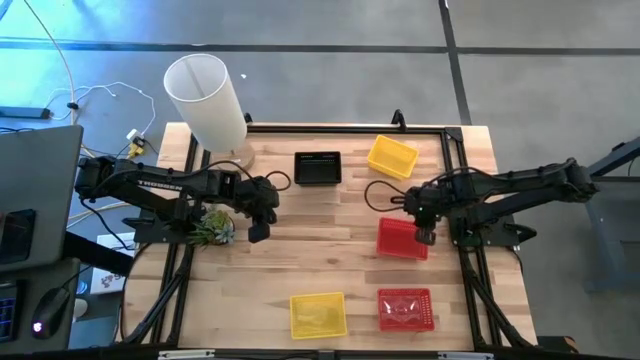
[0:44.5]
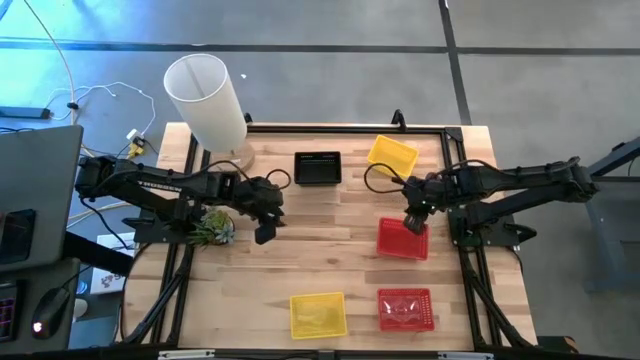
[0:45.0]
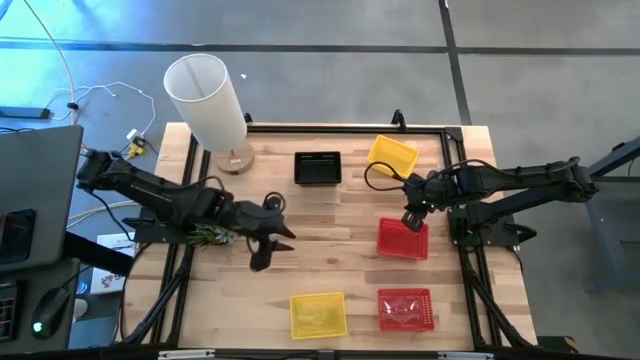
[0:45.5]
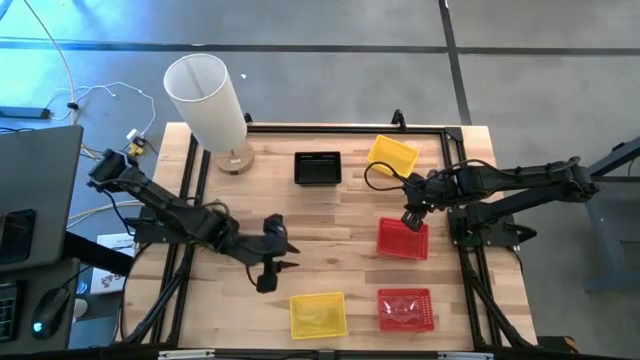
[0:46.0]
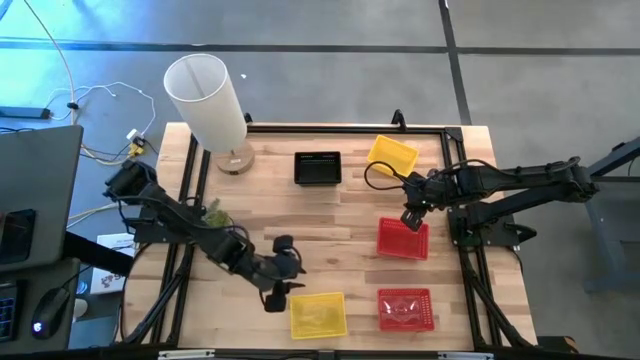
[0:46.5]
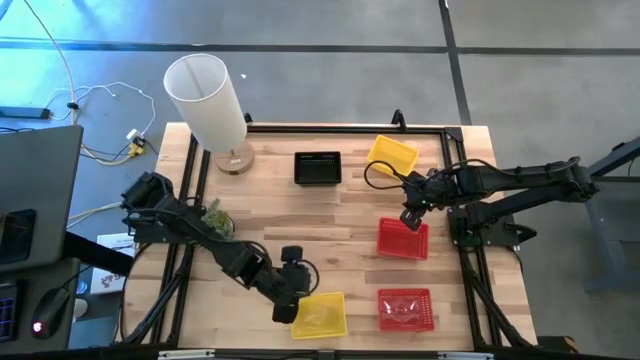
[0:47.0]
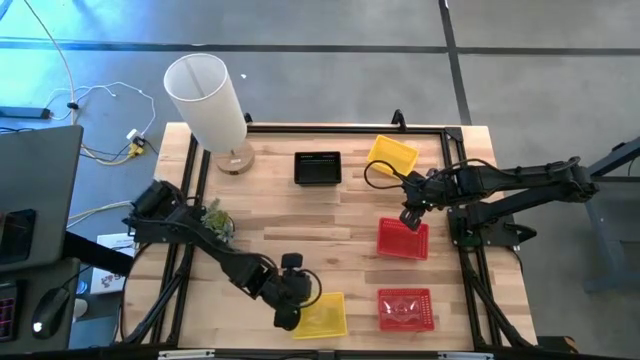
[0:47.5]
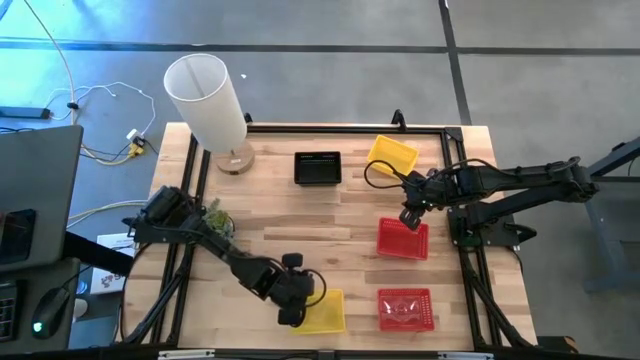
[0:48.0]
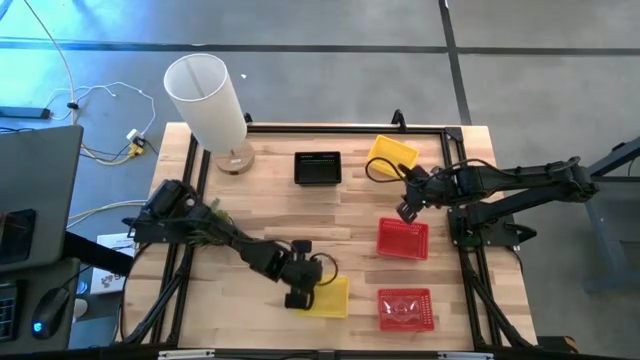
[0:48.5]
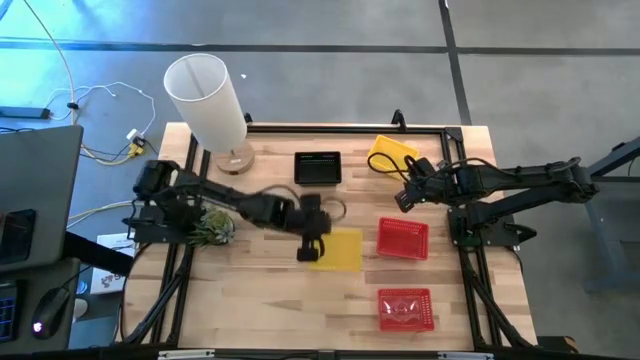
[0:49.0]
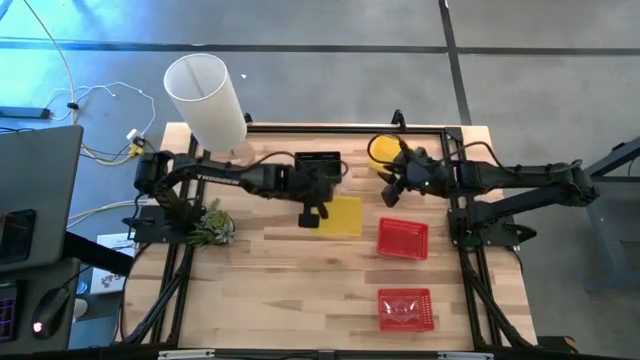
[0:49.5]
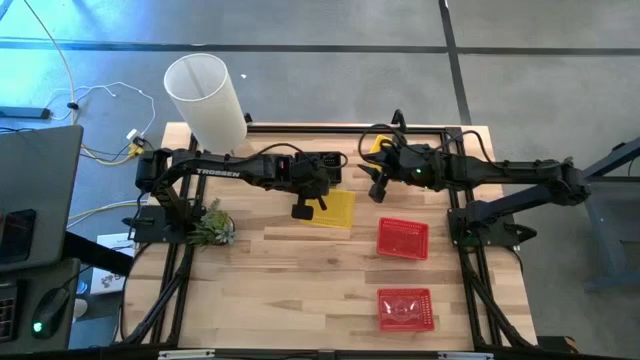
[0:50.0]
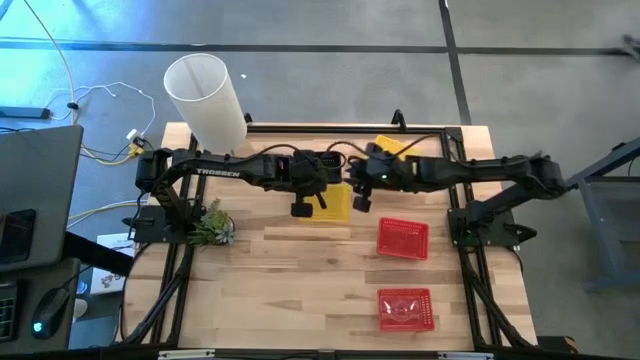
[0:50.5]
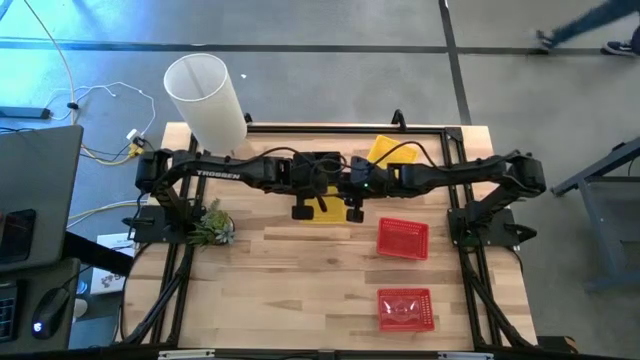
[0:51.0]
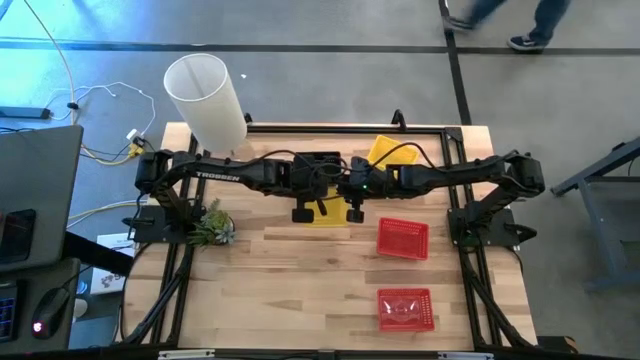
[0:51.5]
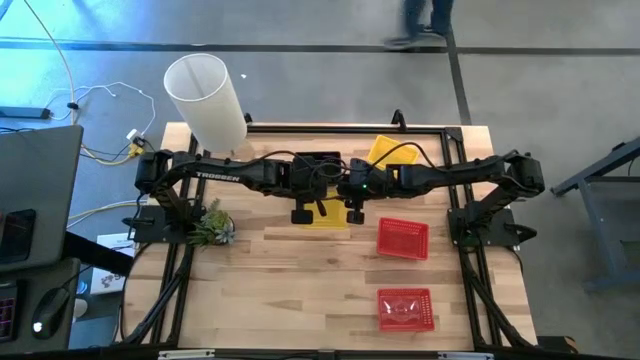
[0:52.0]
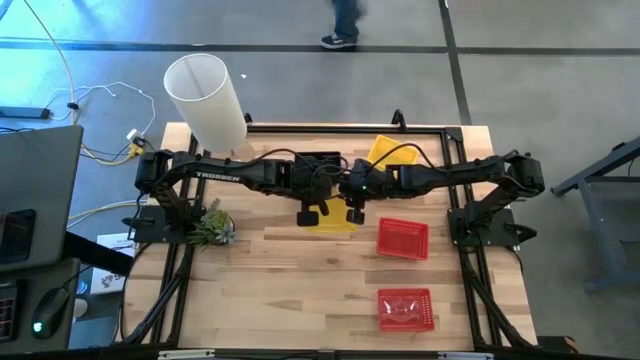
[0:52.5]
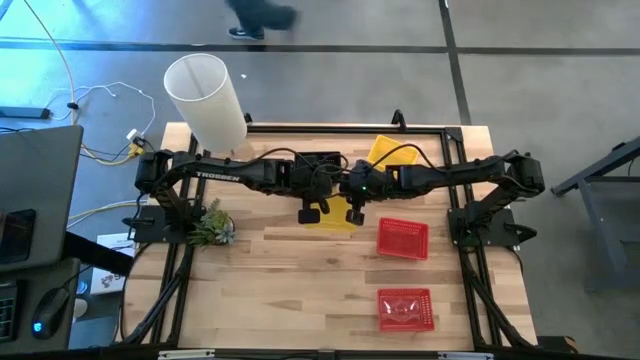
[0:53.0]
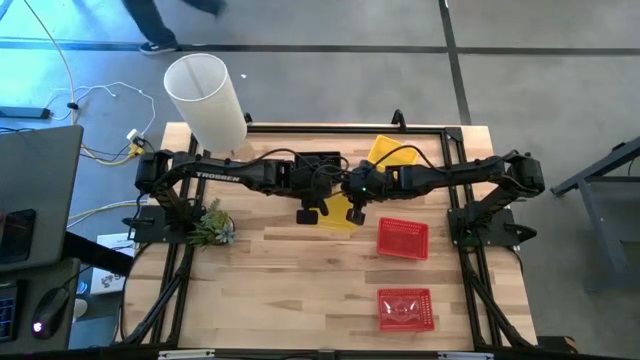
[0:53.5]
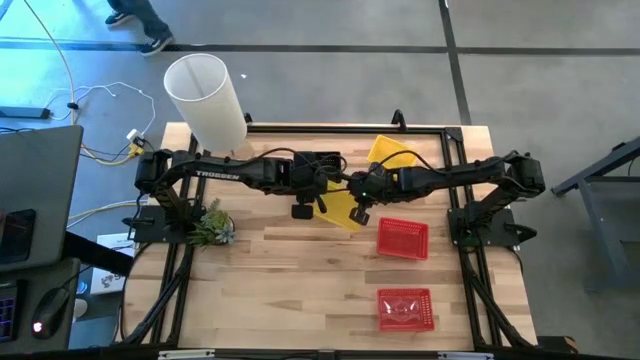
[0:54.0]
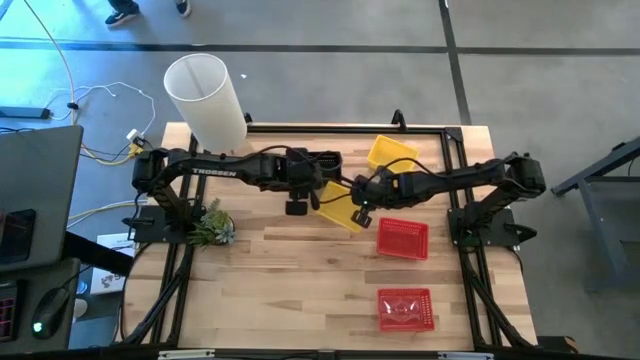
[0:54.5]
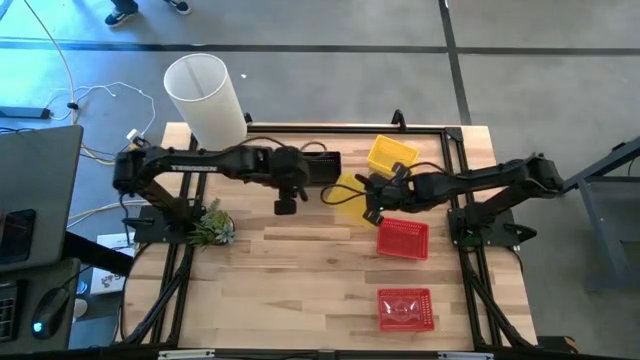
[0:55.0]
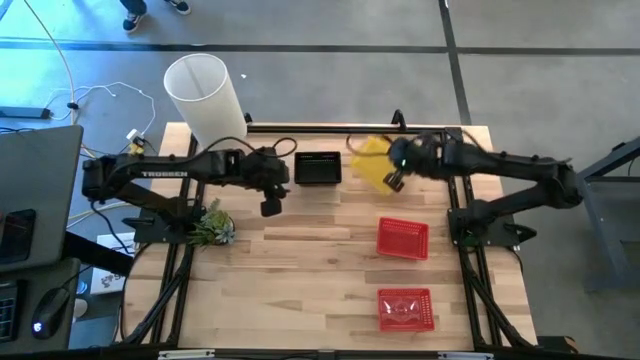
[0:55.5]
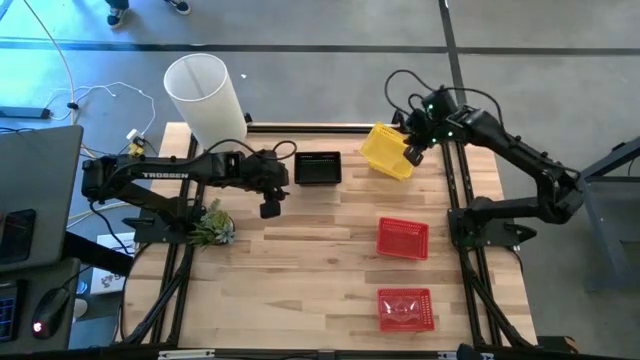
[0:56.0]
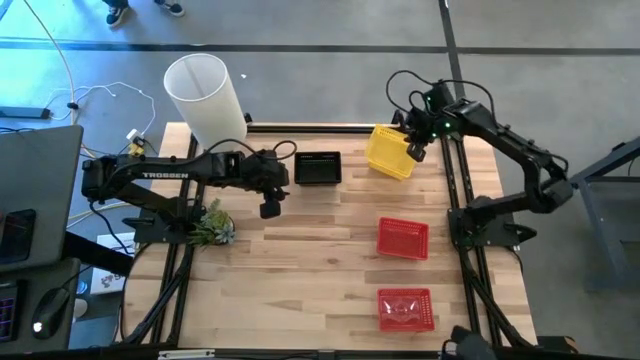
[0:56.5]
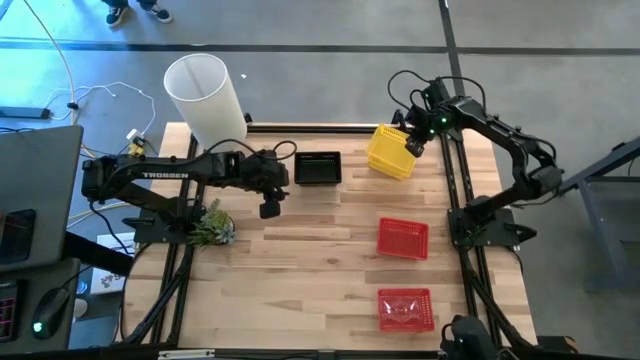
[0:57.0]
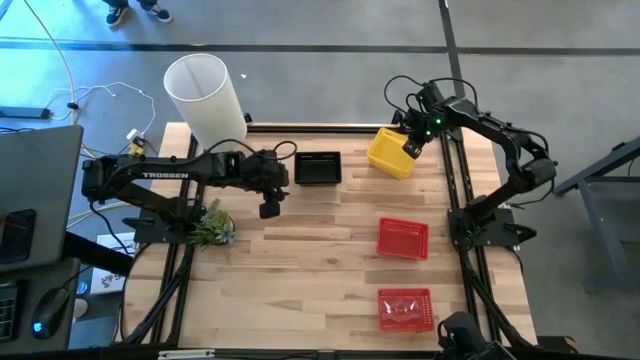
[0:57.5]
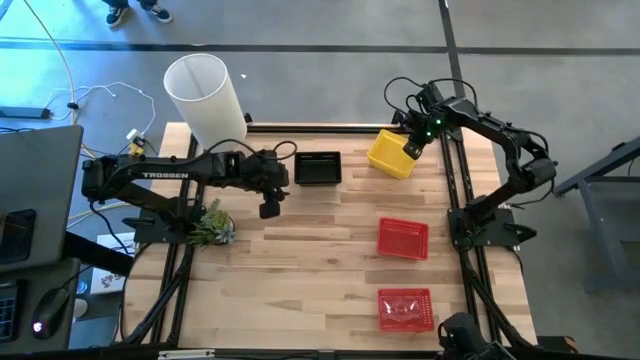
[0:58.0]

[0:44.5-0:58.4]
Stack the bottom yellow bin on top of the top yellow bin

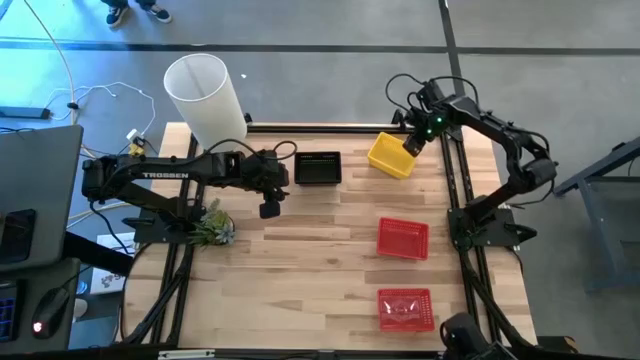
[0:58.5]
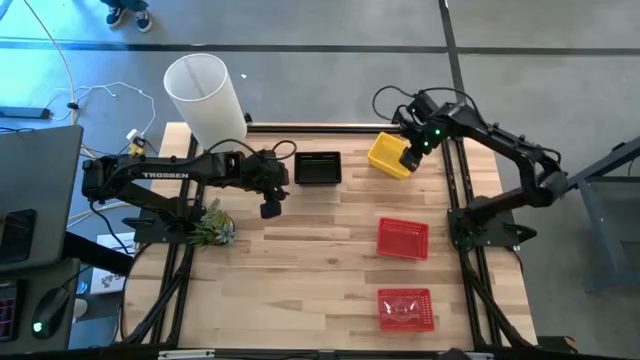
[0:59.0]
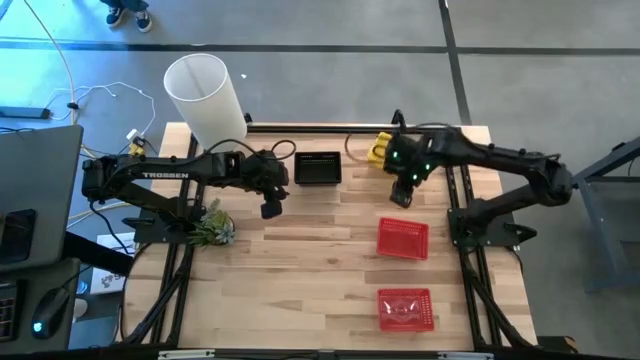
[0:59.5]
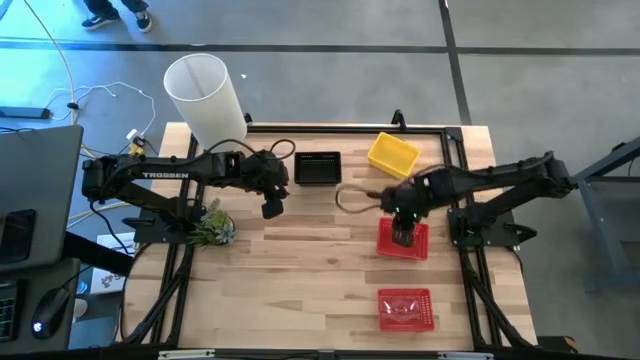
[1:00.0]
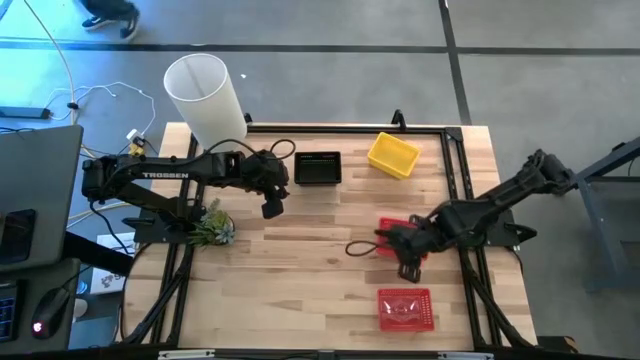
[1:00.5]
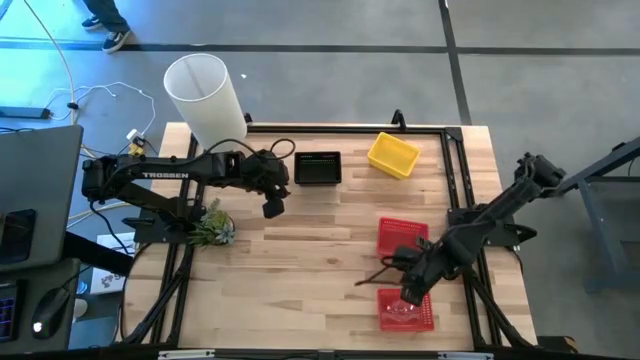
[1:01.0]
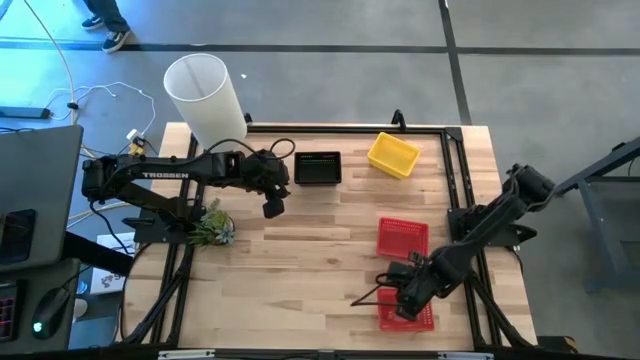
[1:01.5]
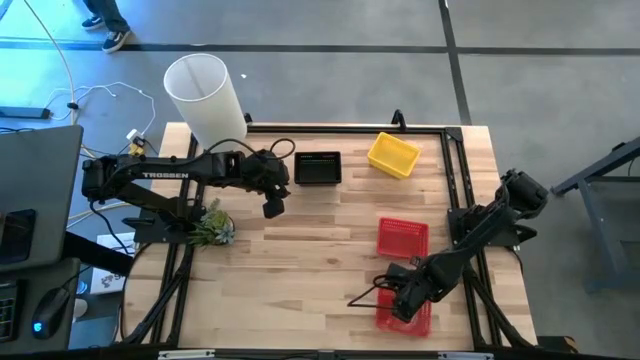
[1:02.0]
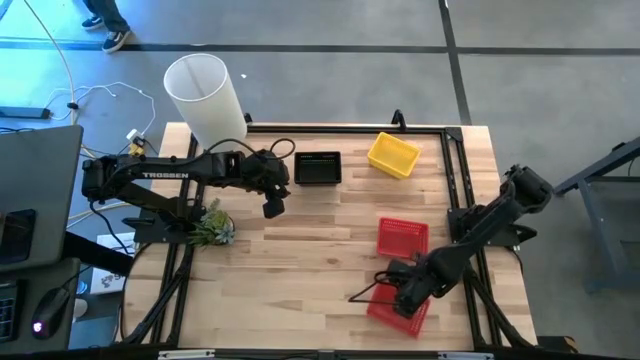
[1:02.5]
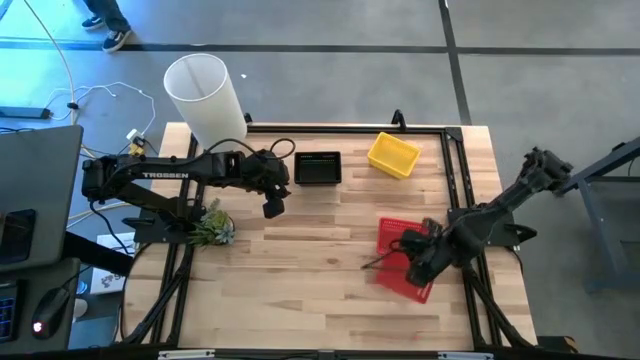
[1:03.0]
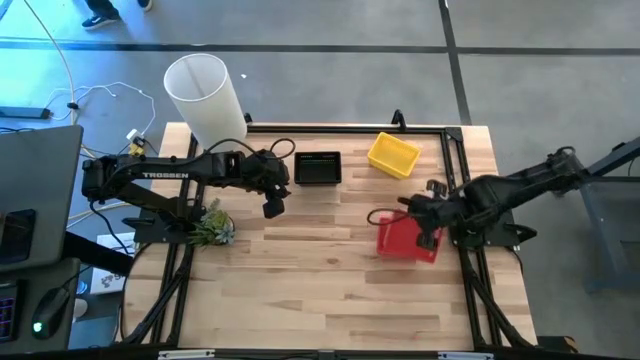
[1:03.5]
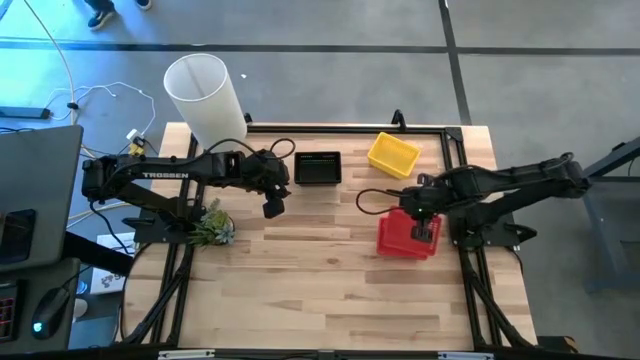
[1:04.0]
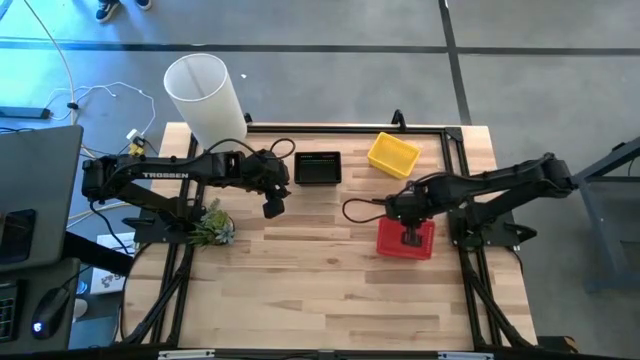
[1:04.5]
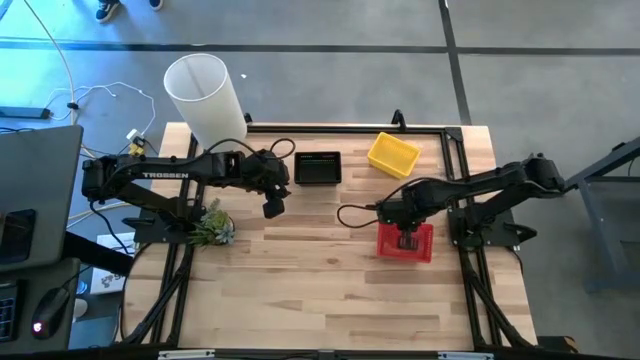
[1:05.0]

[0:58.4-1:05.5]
Stack the bottom red bin on top of the top red bin

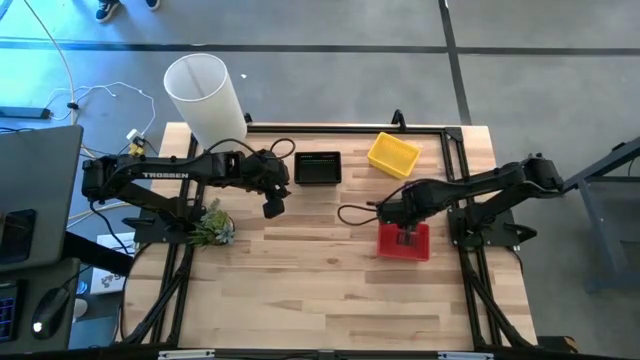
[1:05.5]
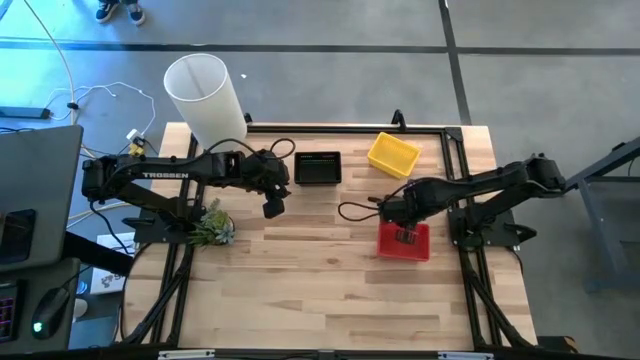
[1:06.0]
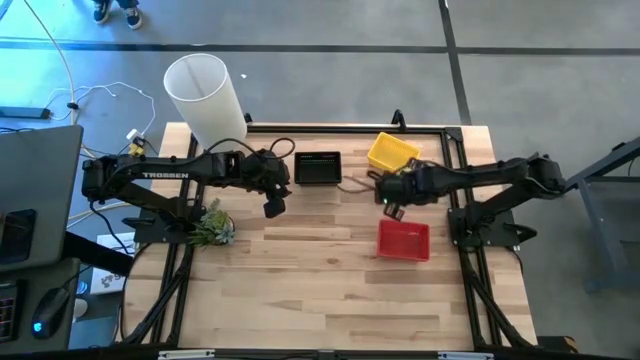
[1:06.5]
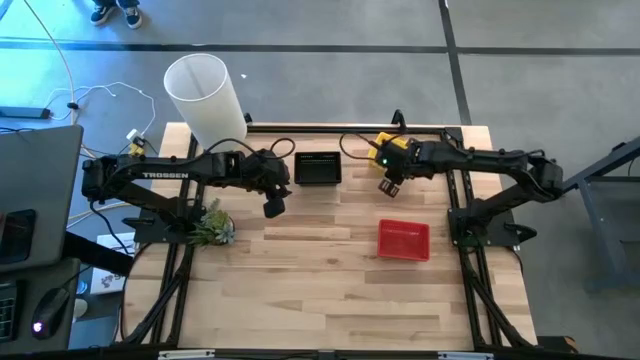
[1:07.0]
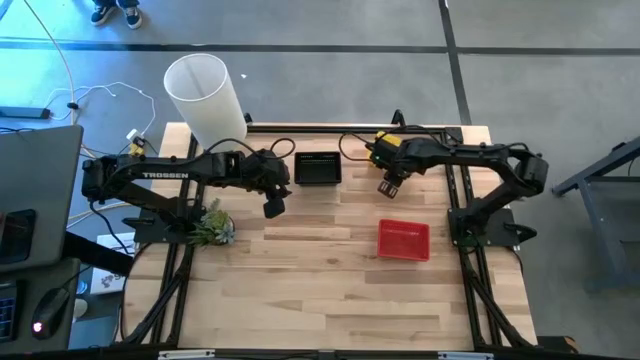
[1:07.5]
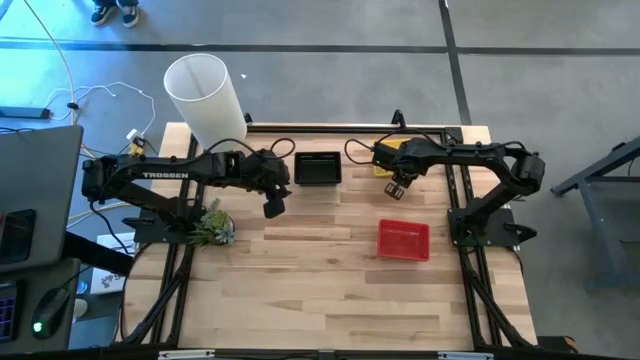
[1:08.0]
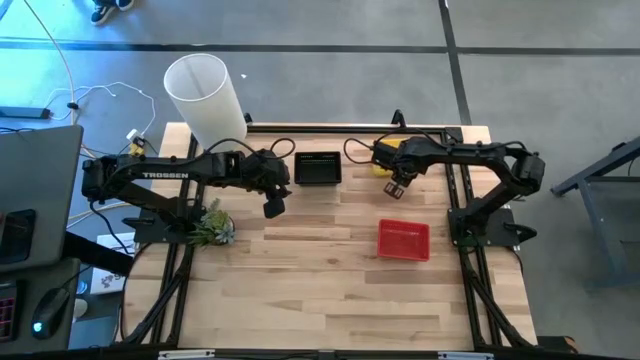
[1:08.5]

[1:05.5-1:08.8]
Adjust the stacked yellow bins
